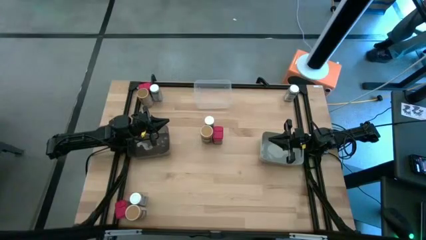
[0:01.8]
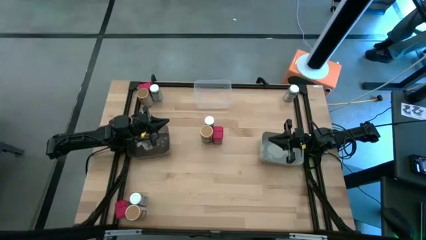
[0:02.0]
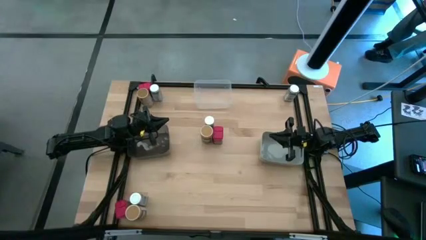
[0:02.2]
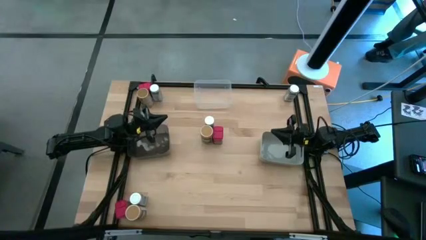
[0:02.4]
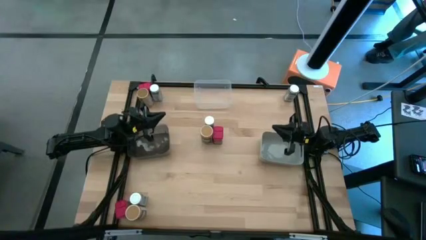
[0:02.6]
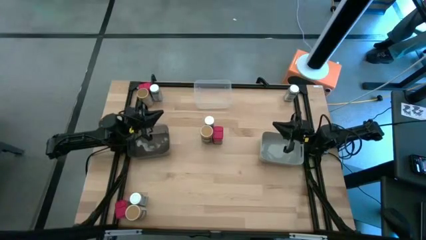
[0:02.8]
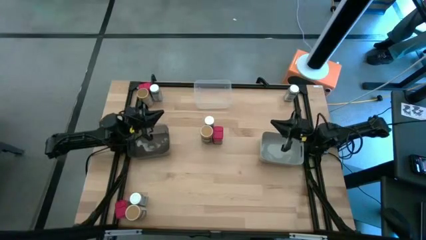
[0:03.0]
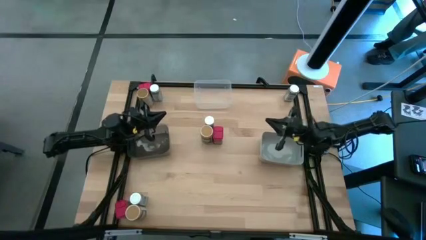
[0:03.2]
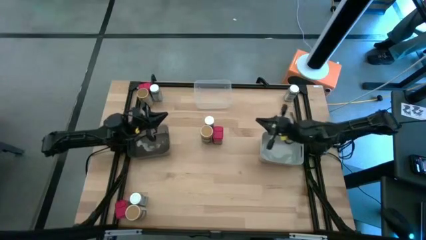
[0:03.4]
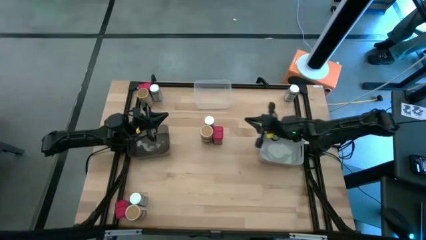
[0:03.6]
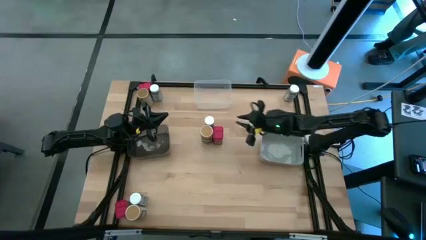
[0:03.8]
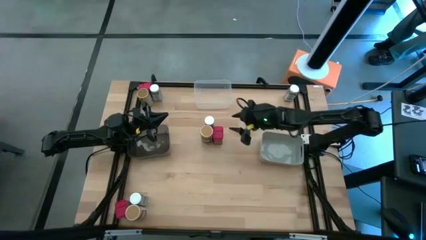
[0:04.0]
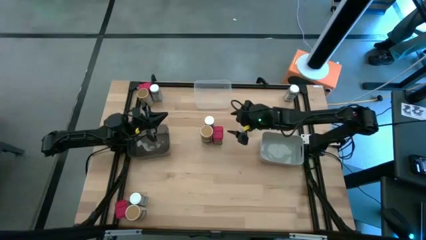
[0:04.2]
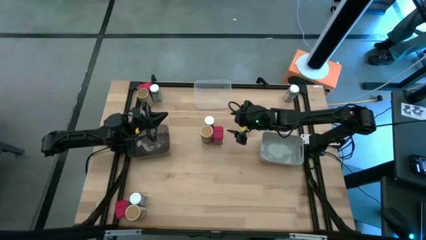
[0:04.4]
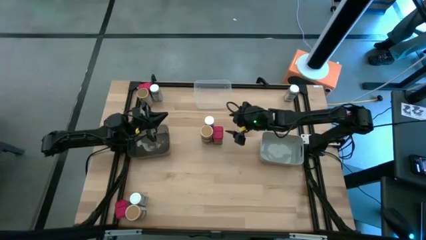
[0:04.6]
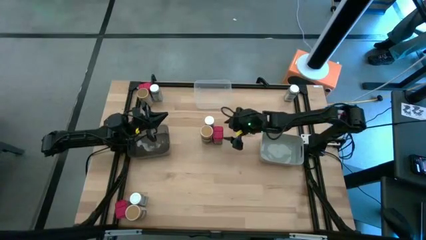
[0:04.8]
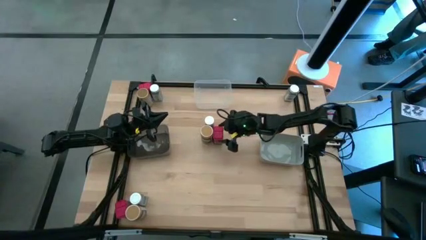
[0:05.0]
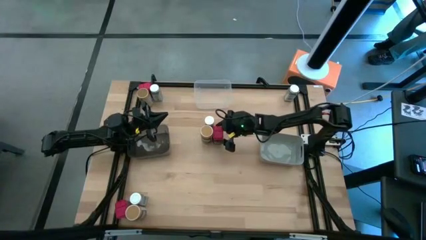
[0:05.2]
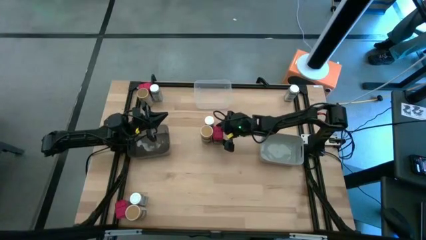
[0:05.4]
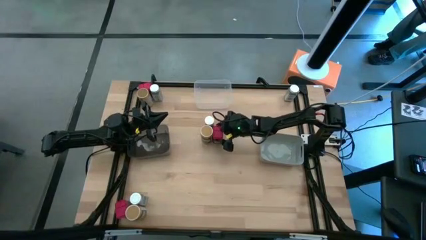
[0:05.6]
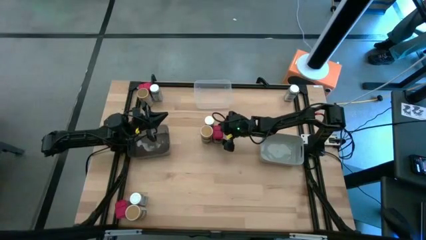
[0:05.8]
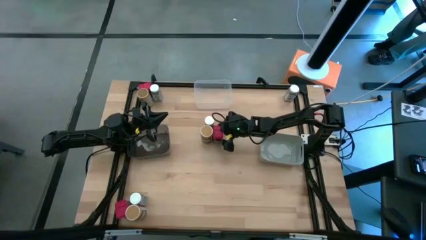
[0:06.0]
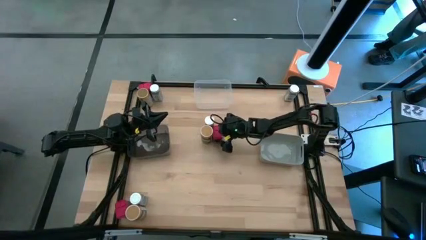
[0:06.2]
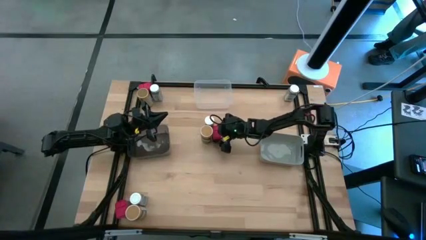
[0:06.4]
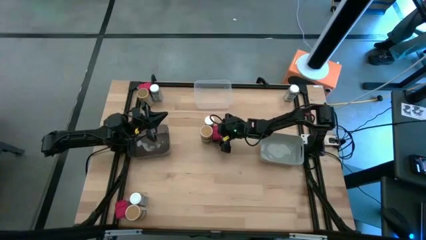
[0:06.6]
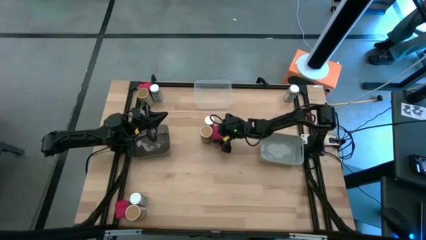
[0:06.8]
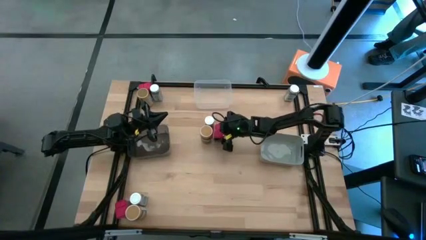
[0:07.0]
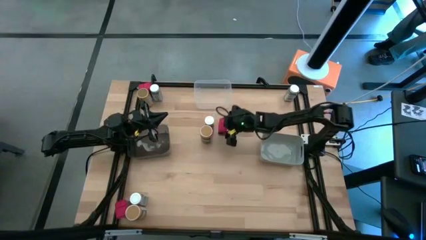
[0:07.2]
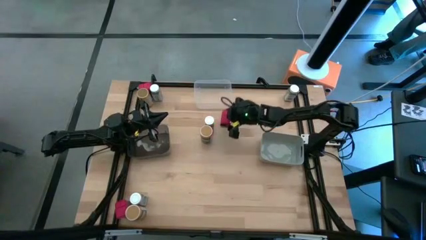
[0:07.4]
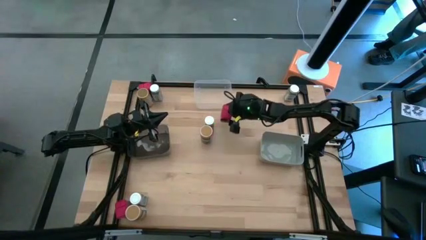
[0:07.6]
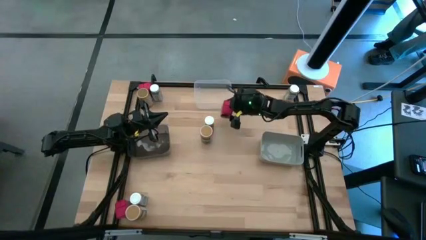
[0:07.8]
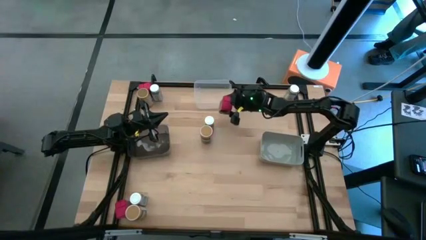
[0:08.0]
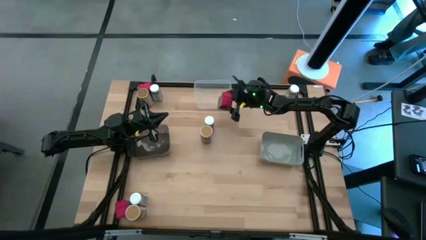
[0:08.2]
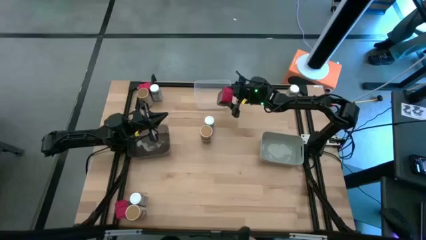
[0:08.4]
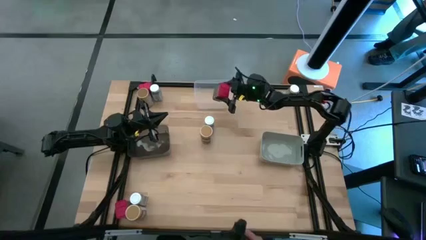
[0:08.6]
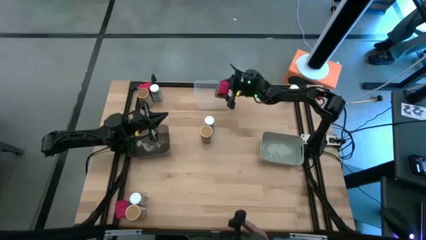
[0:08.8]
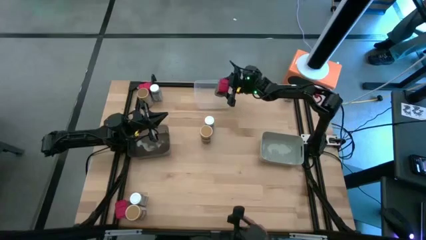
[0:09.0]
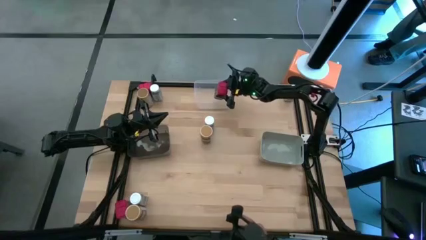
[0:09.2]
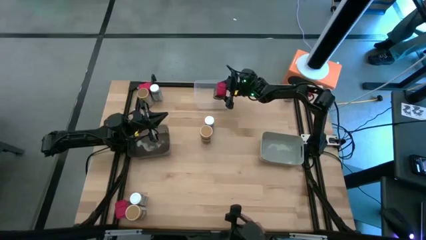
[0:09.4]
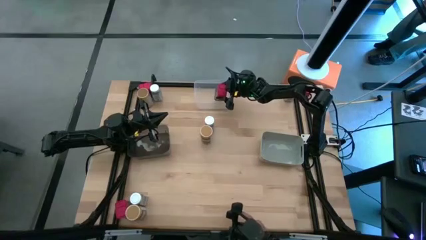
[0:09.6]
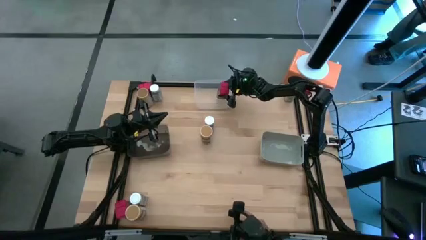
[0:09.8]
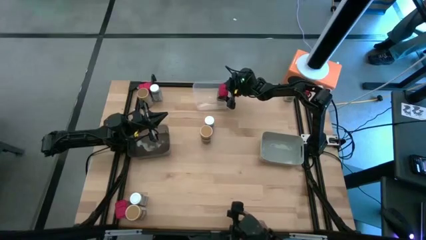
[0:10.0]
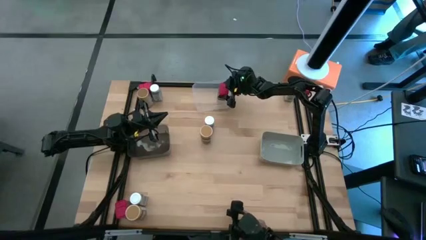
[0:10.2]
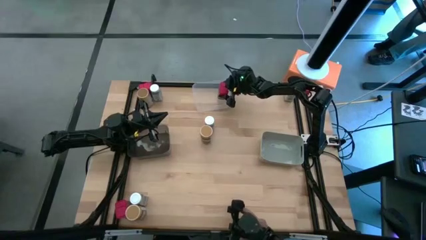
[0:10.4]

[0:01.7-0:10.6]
Task: Sort spices by type
Put the middle red spice can into the transparent bin

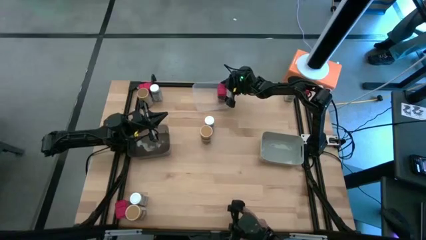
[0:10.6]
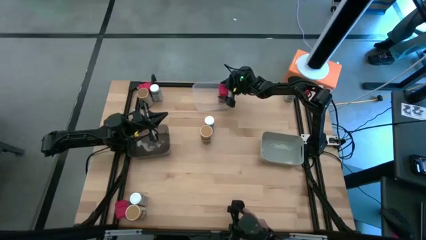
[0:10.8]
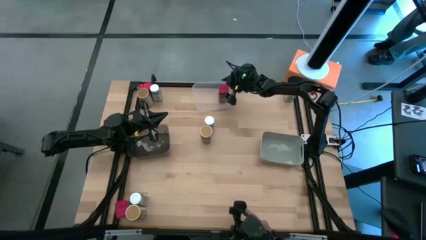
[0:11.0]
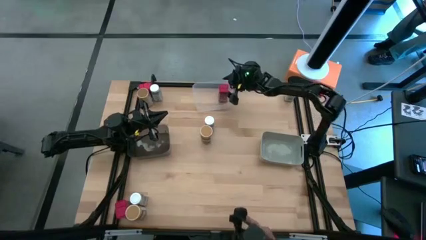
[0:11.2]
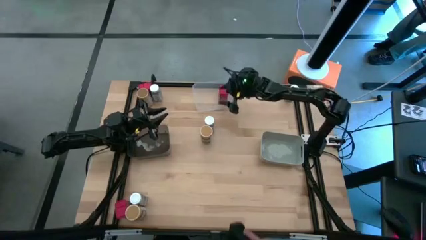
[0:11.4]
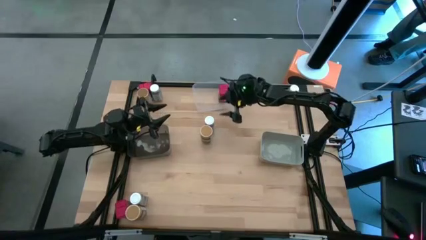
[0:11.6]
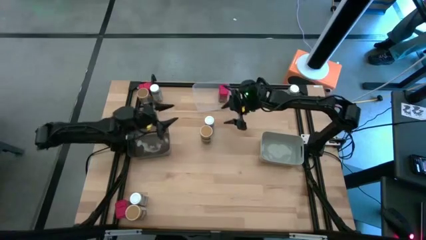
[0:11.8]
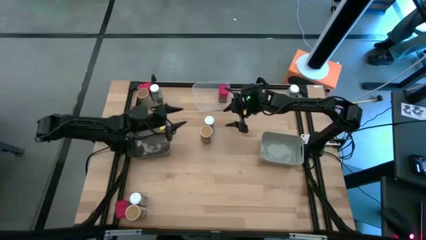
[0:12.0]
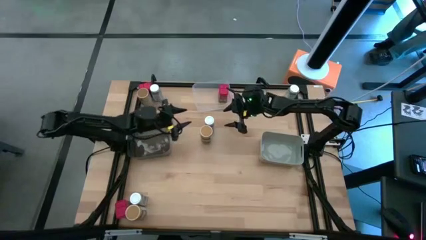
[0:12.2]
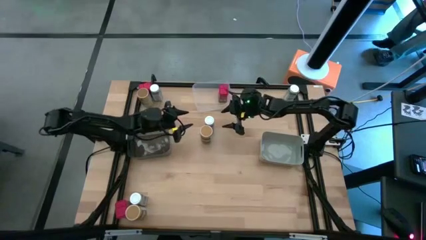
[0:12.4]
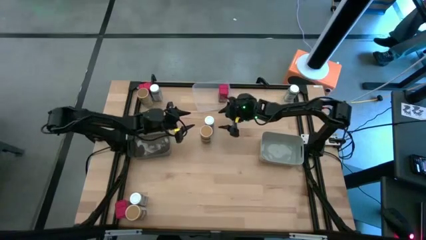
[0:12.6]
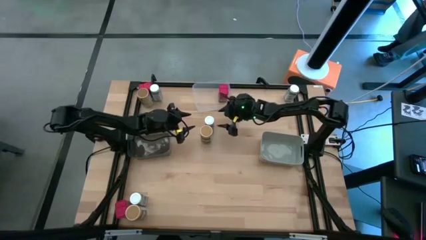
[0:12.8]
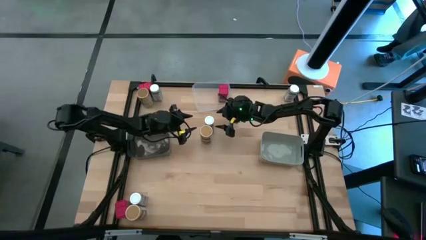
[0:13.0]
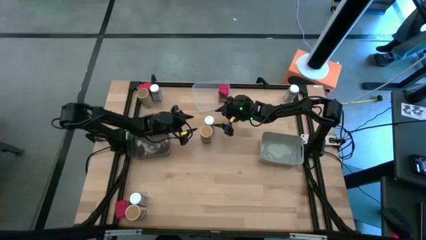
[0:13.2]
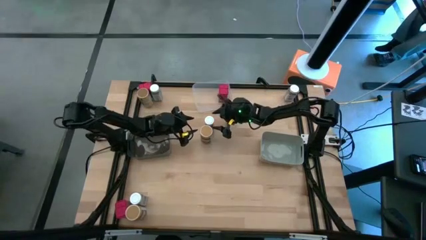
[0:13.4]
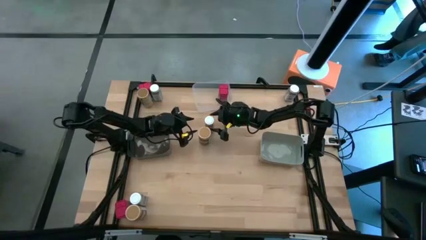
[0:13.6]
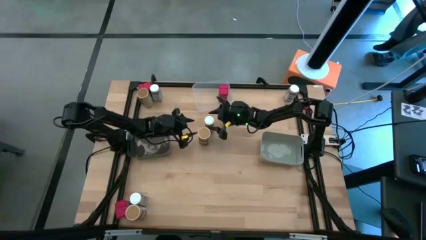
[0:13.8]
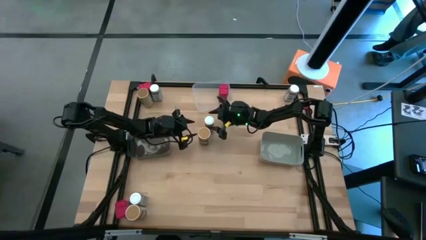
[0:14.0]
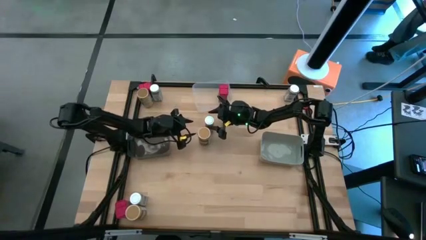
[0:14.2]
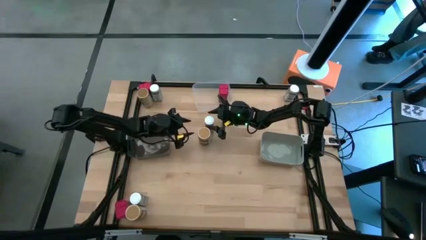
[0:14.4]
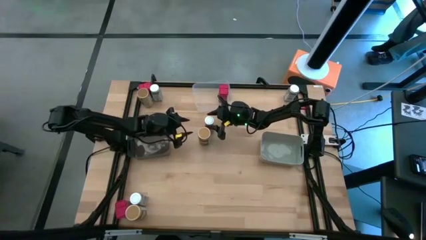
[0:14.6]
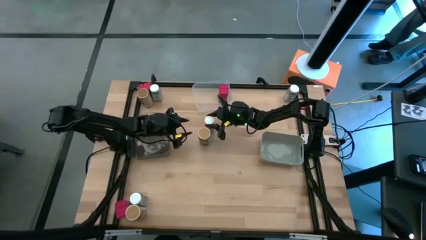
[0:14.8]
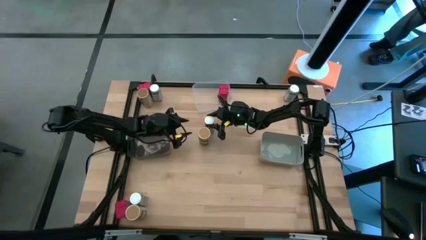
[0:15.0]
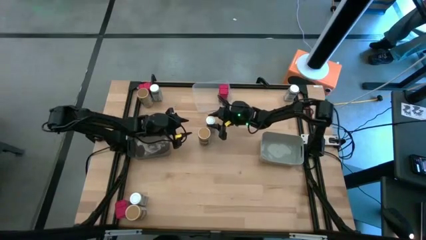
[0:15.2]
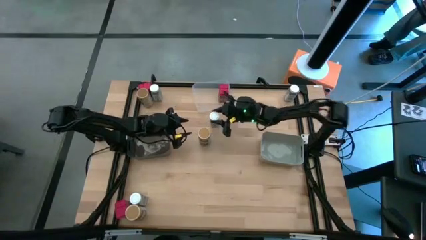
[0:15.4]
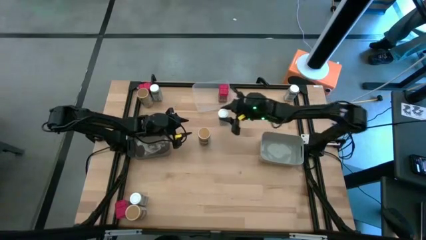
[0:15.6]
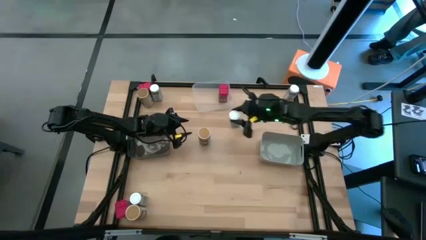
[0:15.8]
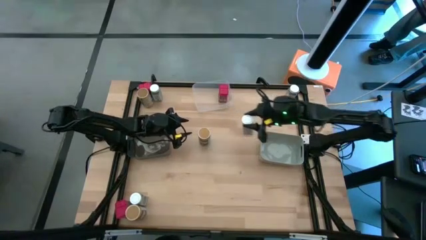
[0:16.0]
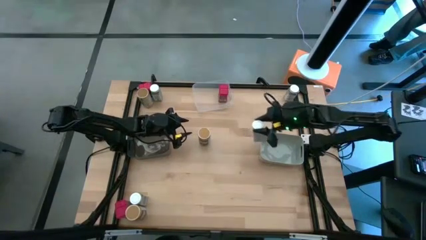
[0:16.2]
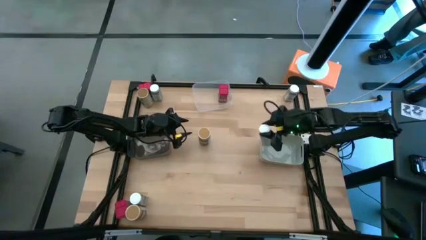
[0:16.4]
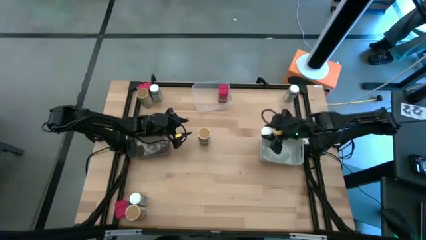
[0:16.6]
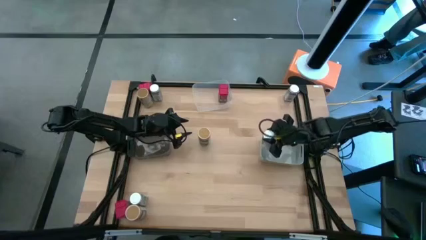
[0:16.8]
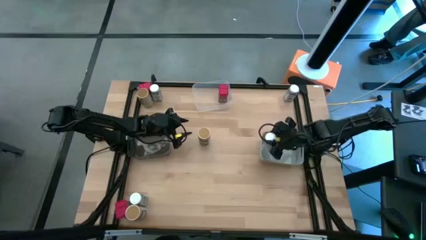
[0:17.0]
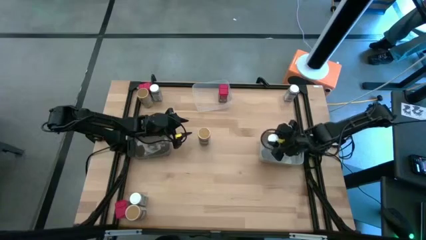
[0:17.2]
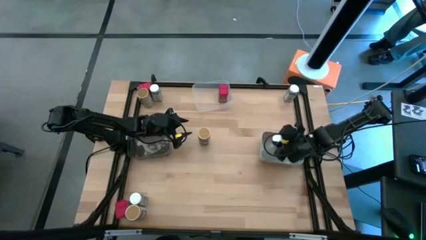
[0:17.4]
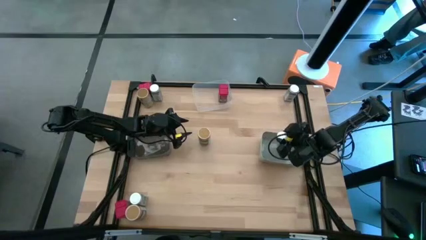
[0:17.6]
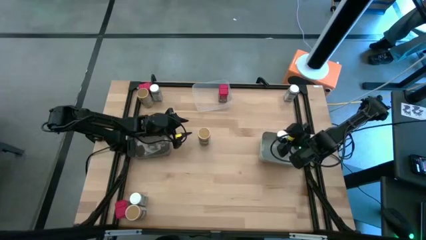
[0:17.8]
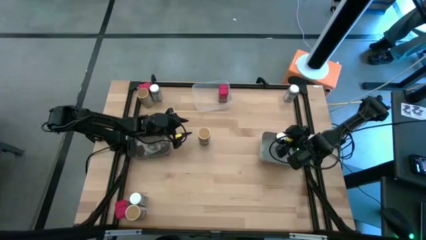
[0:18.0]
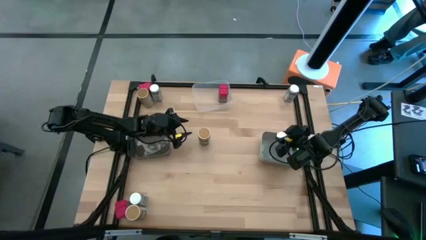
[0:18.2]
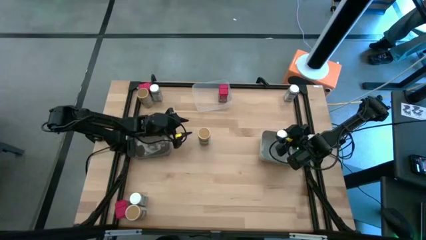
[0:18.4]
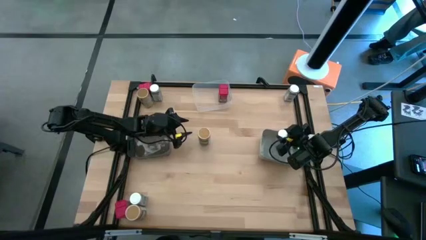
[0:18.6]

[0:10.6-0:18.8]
Put the middle white spice bottle into the gray bin
